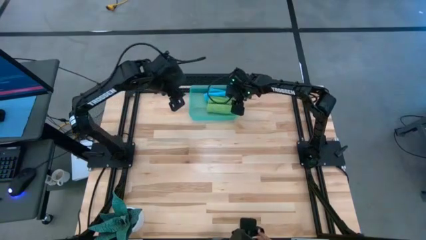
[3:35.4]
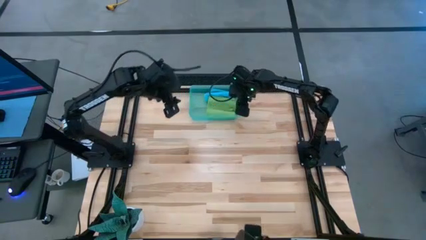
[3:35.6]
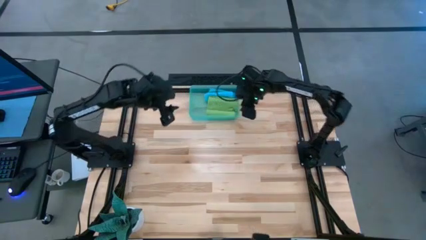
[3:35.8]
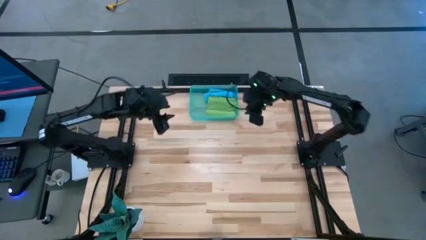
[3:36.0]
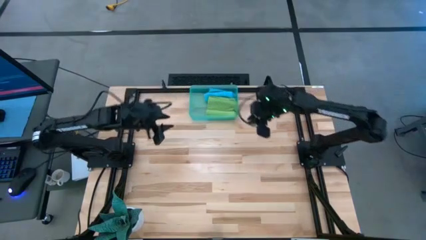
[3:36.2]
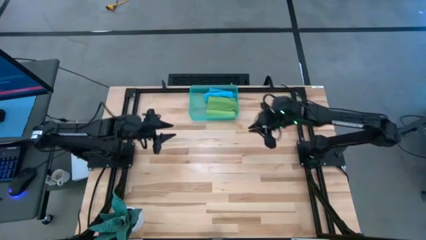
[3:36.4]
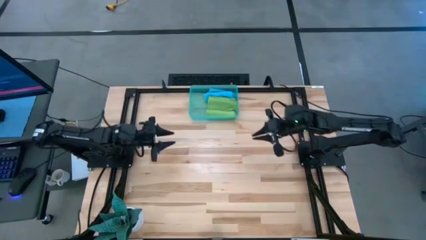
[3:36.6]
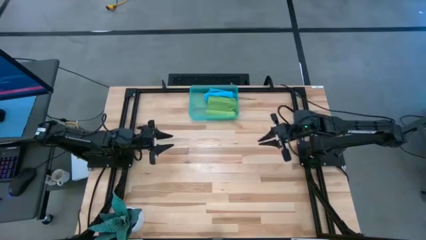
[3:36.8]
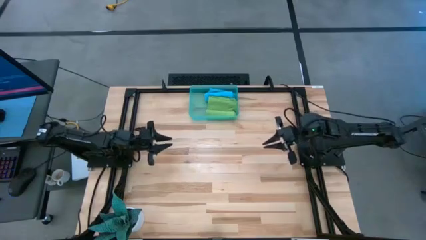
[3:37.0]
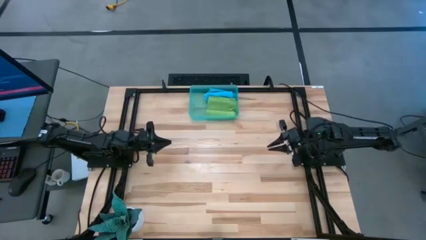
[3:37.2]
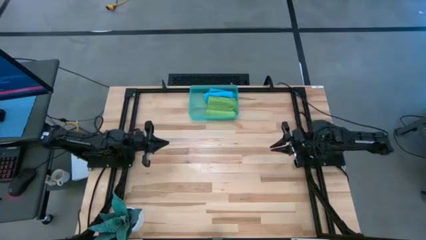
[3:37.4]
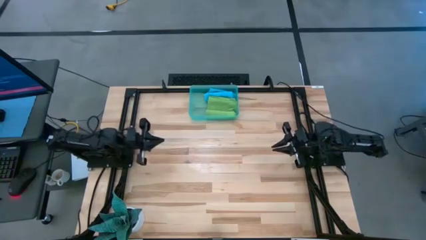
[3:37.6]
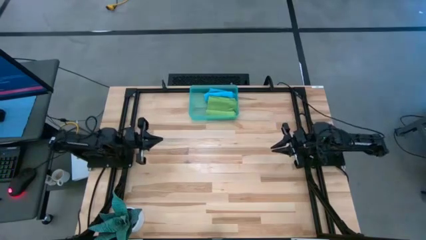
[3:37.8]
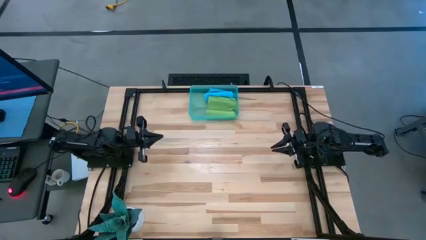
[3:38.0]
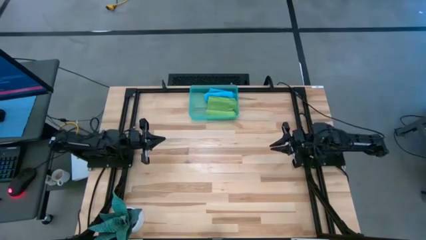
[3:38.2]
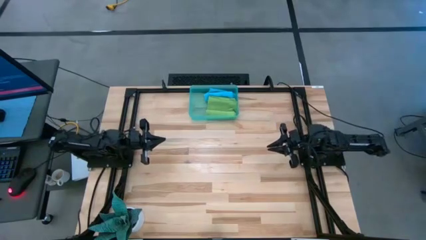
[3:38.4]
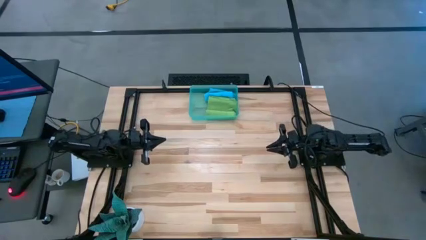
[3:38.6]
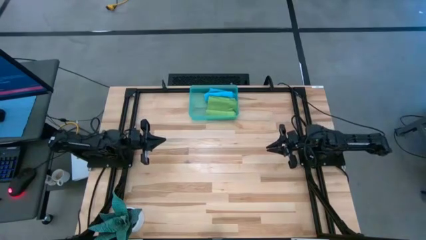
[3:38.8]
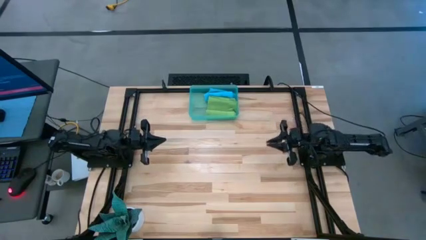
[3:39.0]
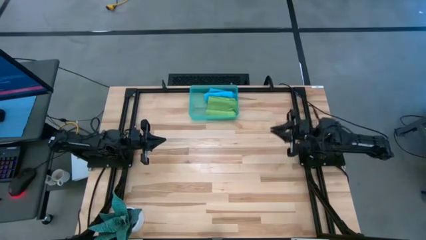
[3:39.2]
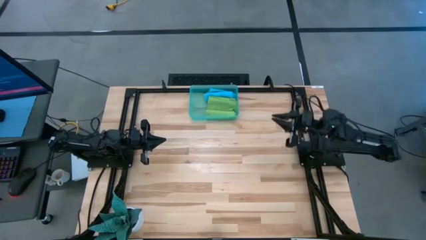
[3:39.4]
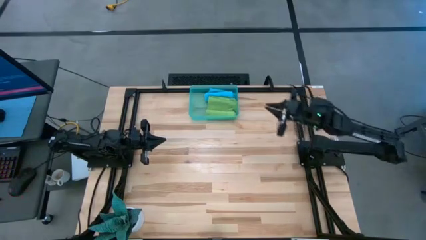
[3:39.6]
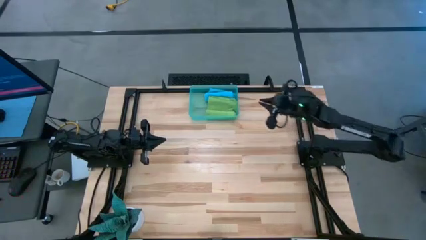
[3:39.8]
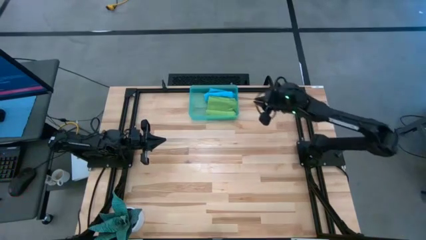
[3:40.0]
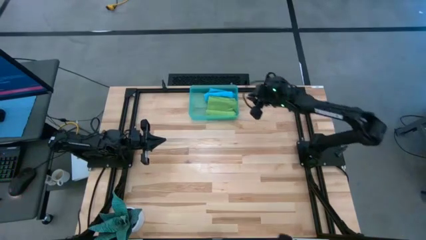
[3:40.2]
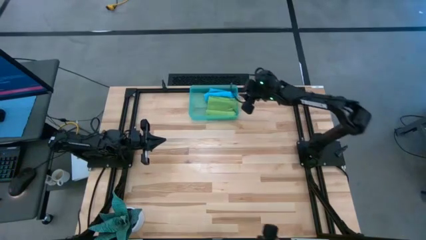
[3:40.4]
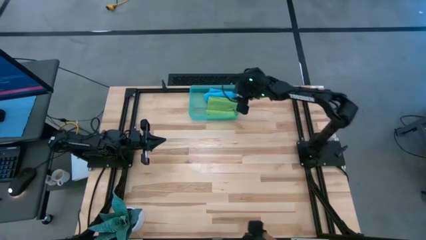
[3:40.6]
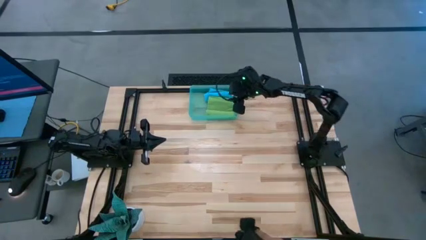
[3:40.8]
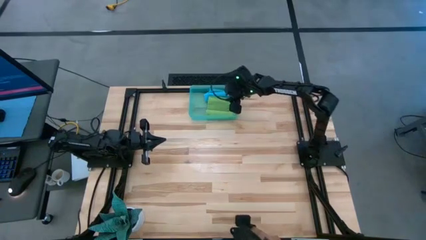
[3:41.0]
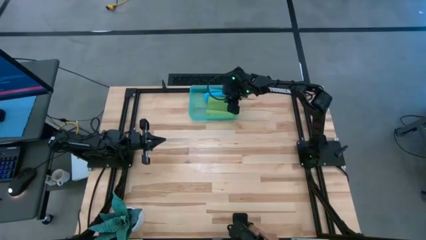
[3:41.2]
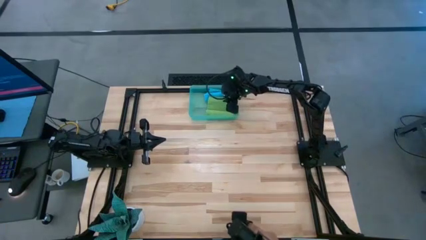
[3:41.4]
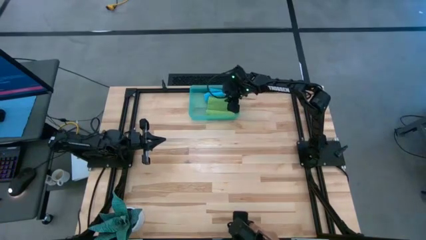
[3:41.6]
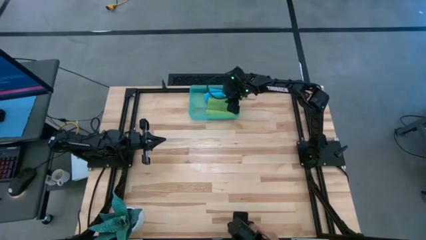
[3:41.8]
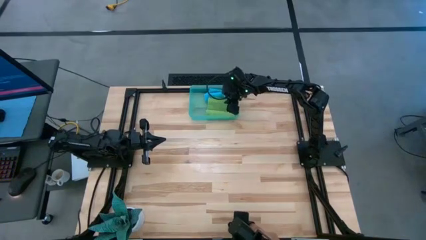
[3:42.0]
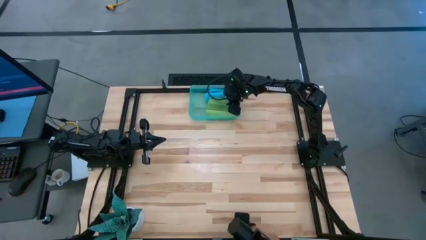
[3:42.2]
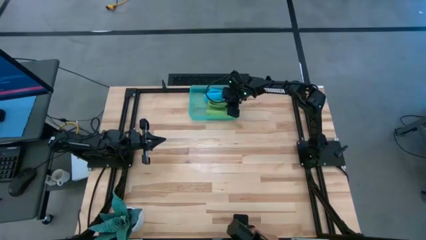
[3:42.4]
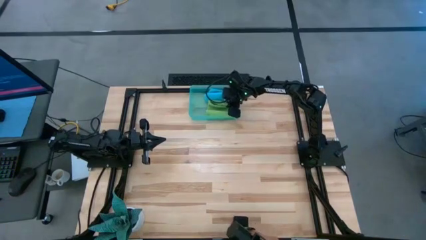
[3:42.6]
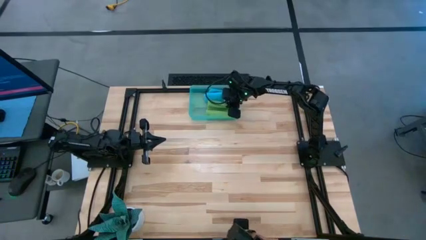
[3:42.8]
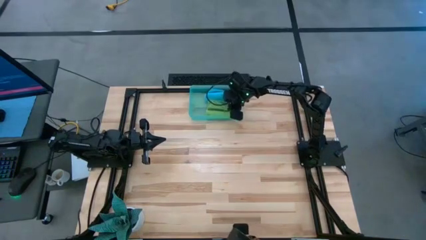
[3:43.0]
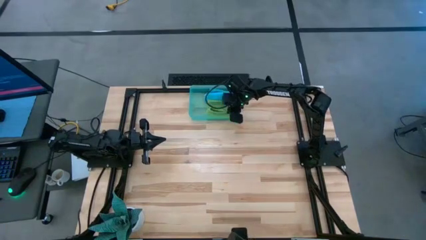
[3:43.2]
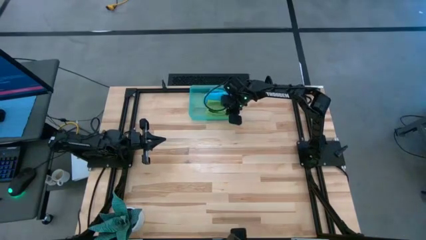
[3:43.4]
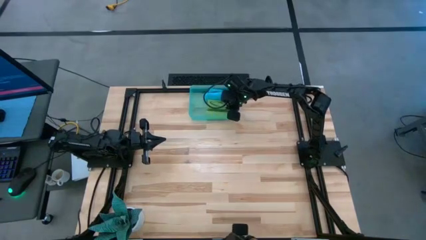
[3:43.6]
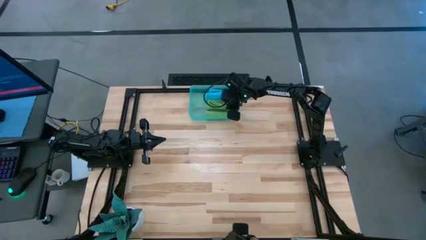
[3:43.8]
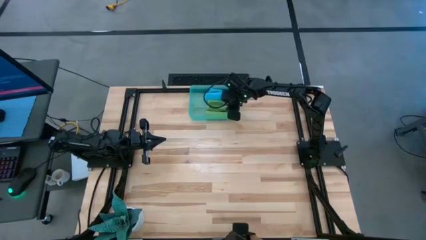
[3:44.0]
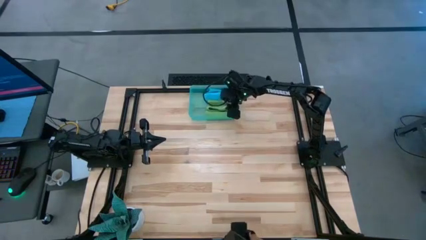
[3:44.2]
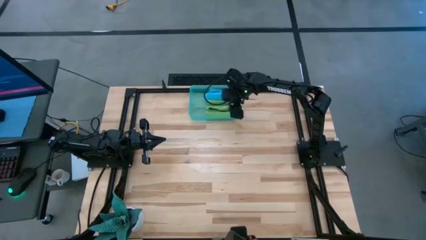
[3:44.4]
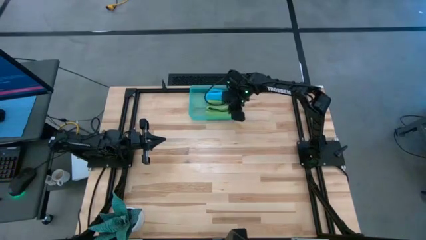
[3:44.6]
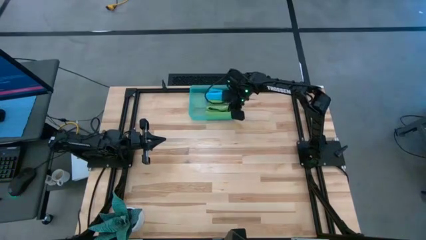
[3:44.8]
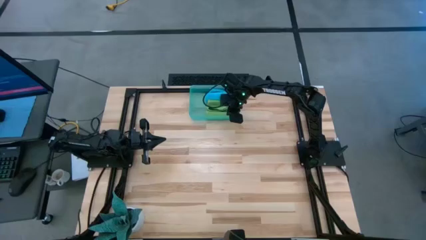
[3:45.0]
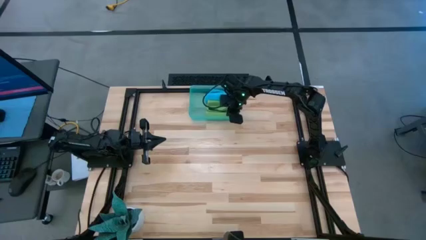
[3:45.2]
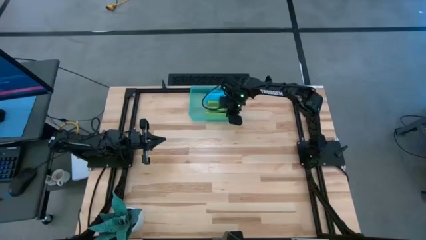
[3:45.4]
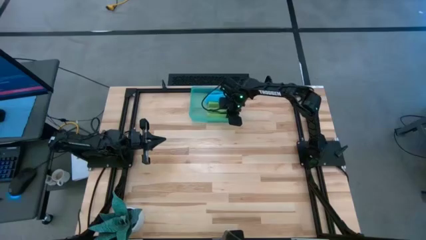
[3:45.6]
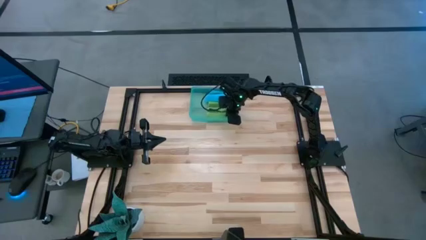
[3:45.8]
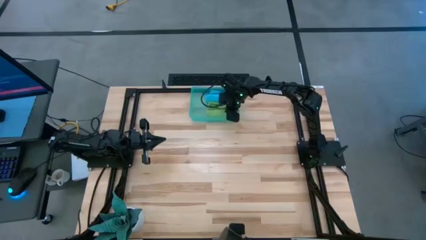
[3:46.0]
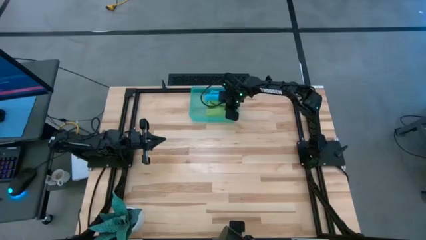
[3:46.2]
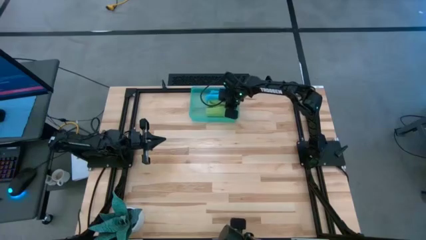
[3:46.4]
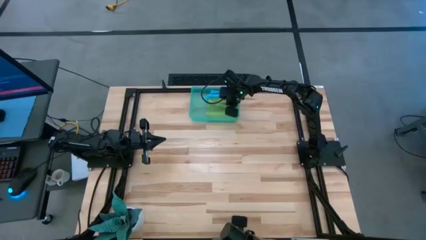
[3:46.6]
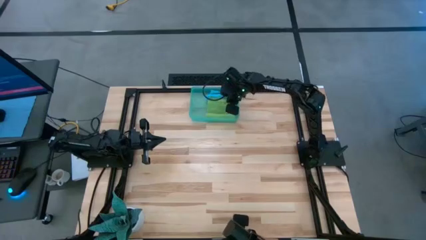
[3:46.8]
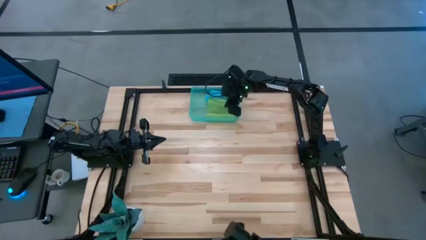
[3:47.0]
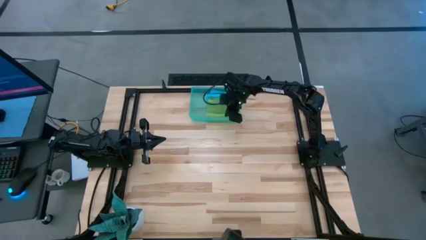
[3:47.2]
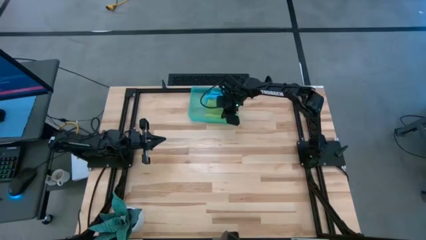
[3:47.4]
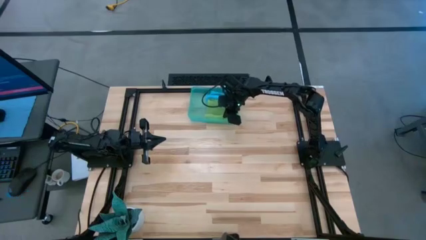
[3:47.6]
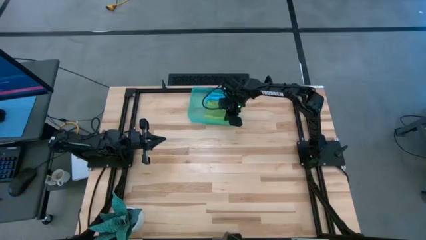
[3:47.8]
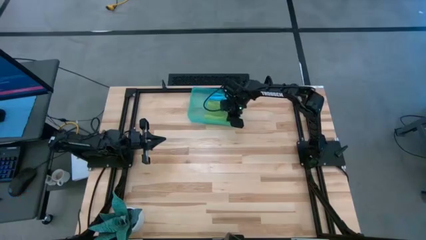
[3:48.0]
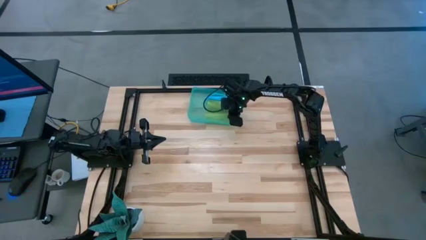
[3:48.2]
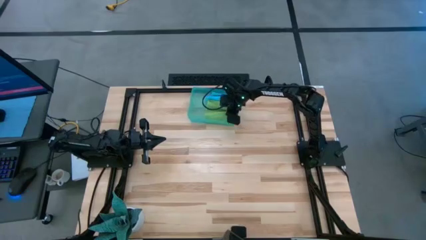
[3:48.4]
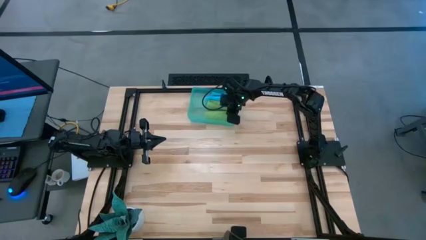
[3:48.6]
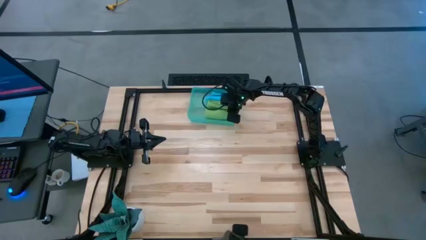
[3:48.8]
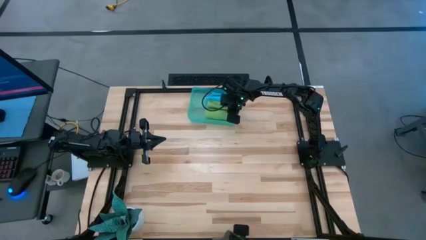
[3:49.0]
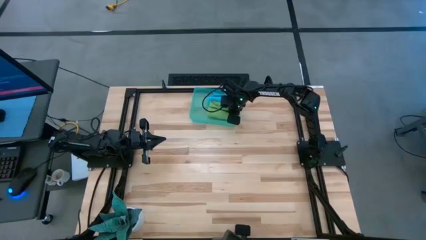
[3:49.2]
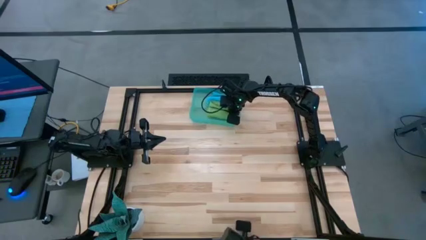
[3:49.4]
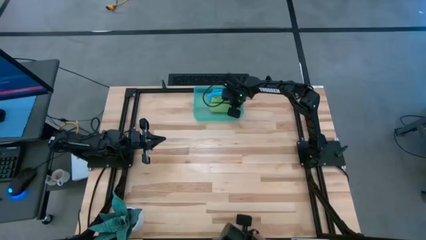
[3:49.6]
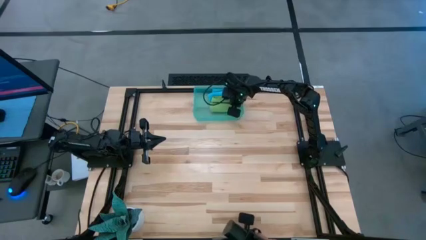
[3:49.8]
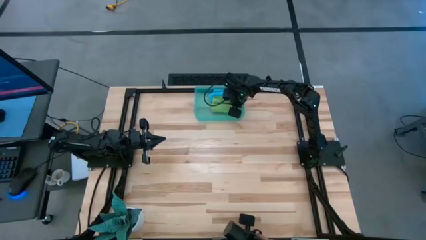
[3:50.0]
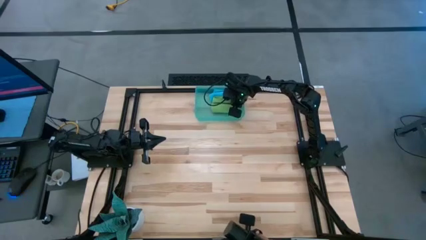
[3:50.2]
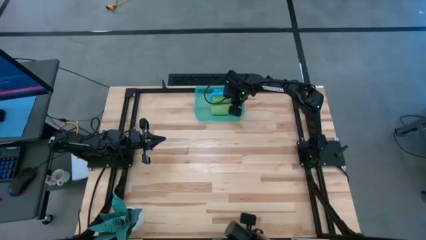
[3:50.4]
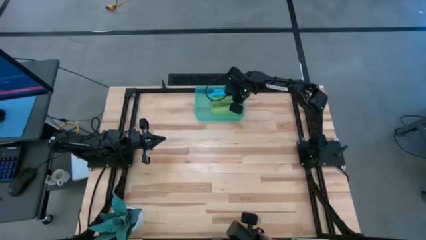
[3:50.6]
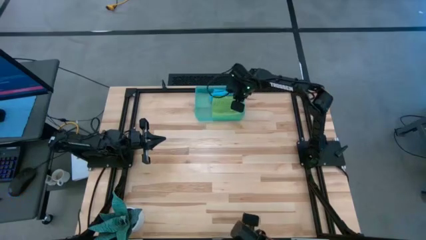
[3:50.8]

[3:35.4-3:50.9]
Task: Roll microfiber towels into tight, uniform cylinder then place into a basket
Adjust the green microfiber cloth
